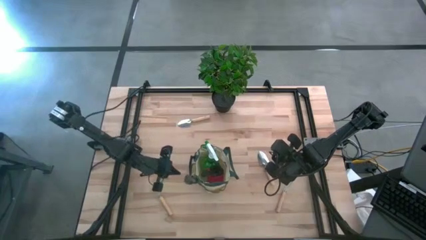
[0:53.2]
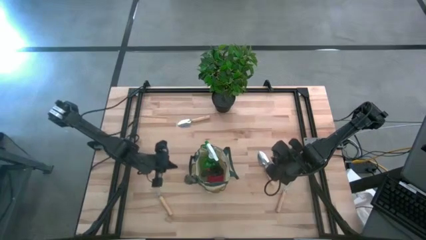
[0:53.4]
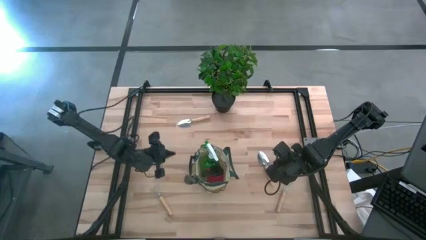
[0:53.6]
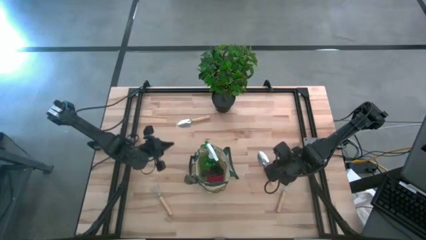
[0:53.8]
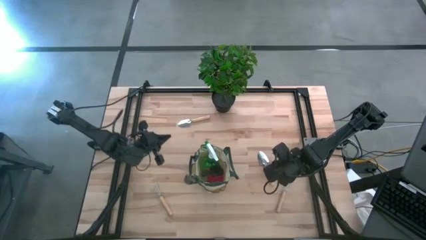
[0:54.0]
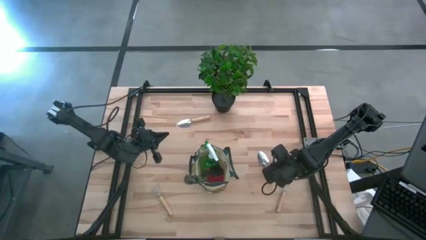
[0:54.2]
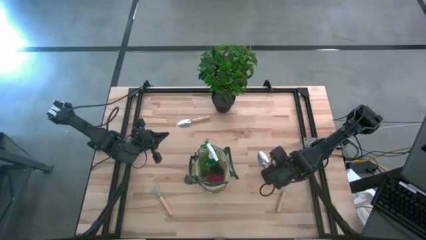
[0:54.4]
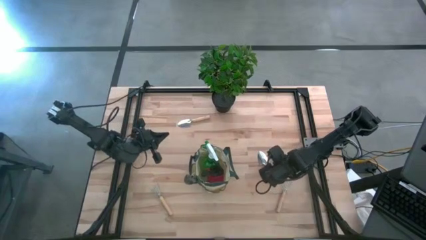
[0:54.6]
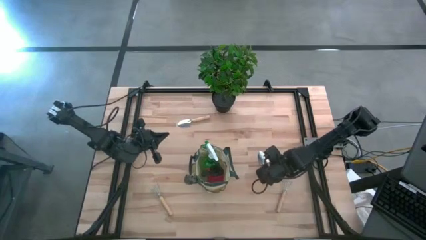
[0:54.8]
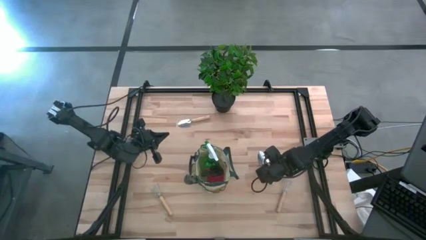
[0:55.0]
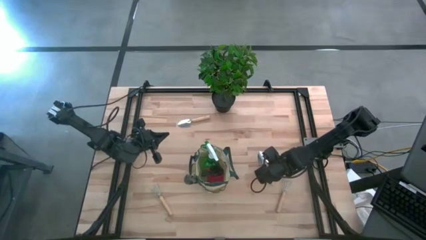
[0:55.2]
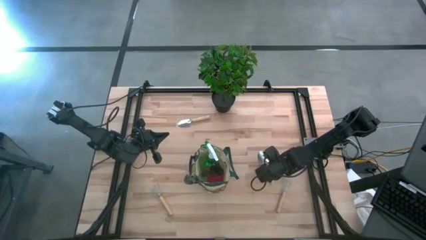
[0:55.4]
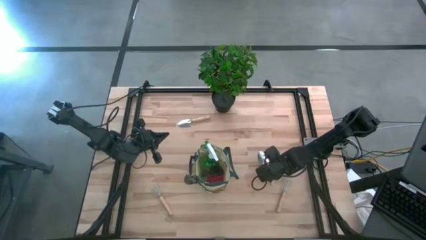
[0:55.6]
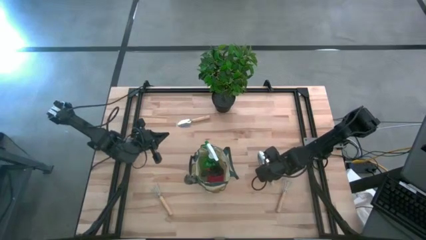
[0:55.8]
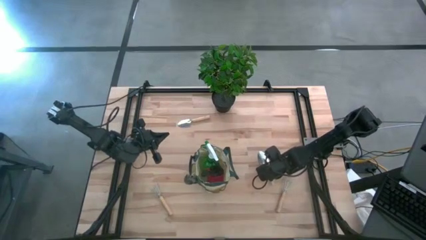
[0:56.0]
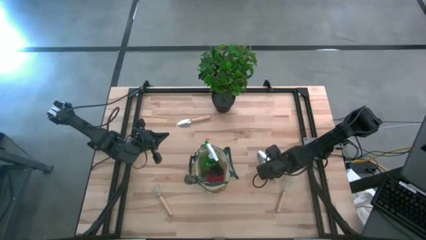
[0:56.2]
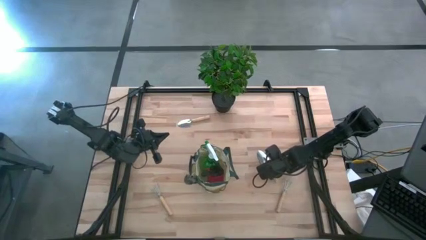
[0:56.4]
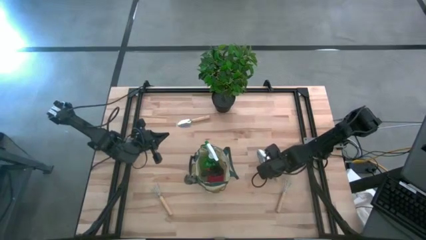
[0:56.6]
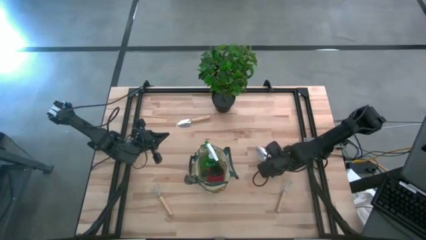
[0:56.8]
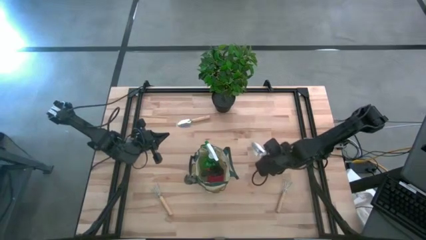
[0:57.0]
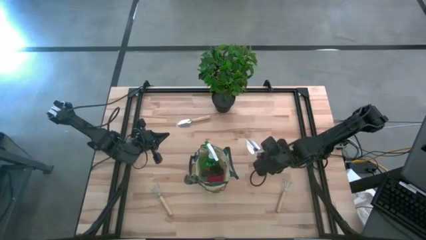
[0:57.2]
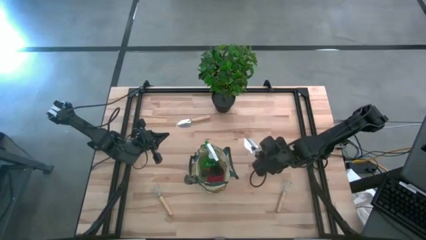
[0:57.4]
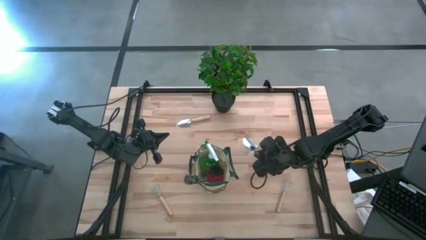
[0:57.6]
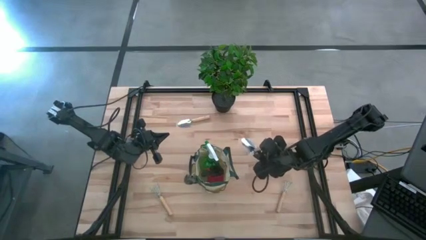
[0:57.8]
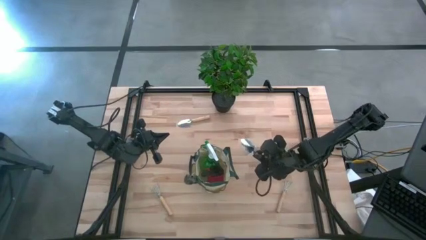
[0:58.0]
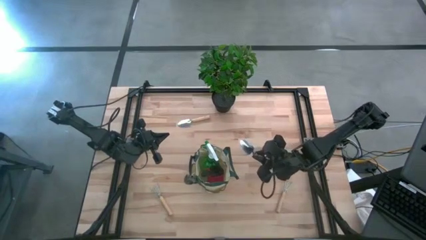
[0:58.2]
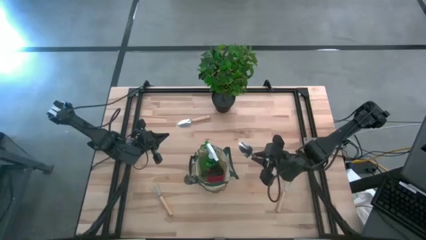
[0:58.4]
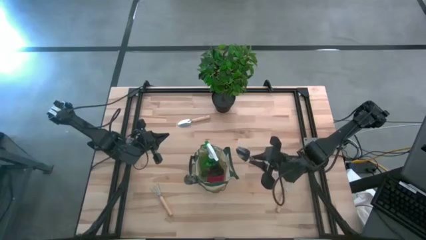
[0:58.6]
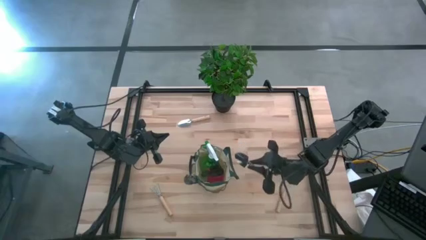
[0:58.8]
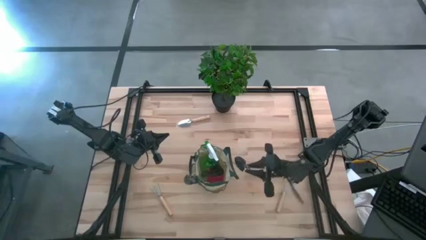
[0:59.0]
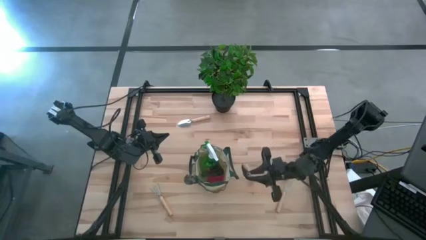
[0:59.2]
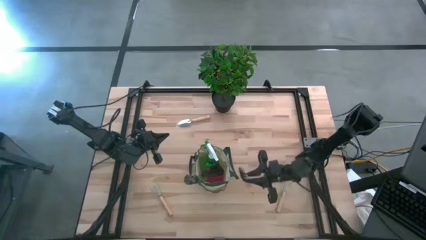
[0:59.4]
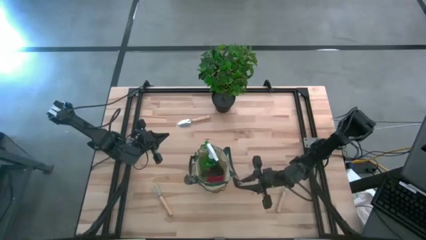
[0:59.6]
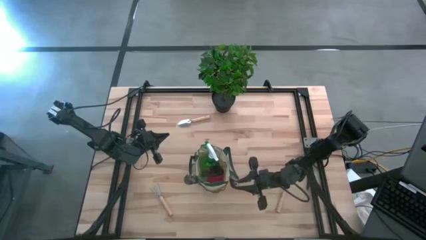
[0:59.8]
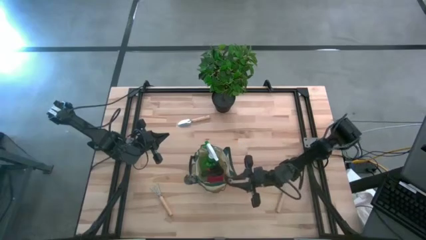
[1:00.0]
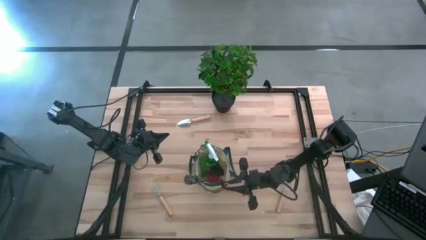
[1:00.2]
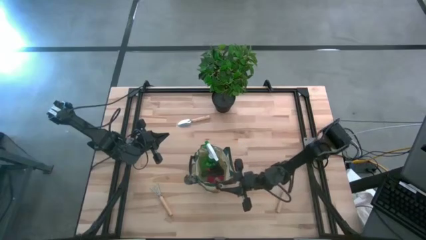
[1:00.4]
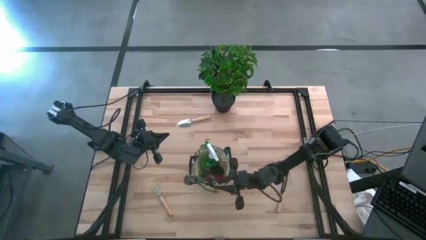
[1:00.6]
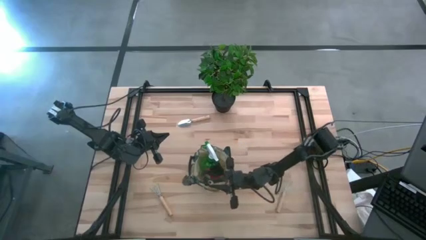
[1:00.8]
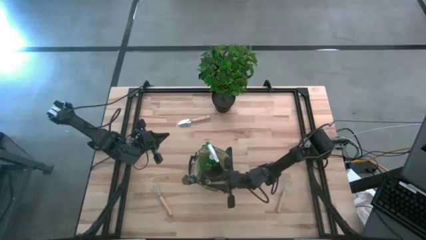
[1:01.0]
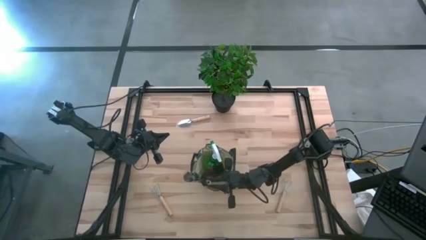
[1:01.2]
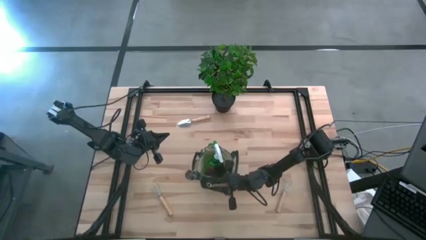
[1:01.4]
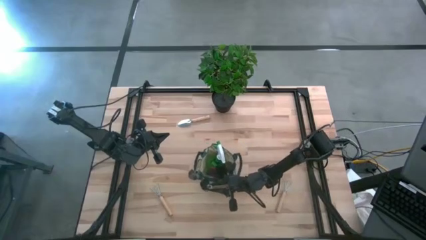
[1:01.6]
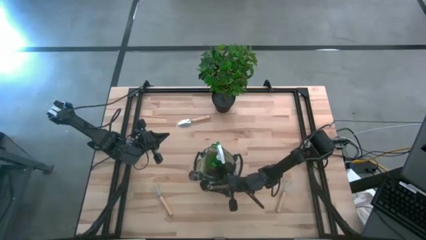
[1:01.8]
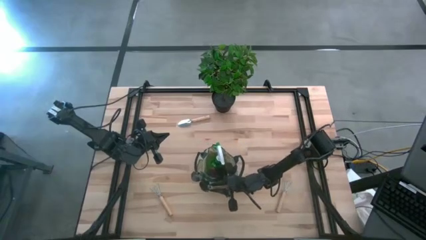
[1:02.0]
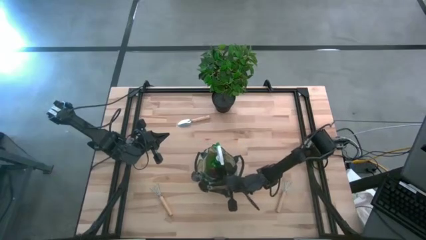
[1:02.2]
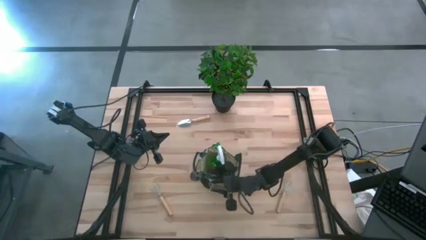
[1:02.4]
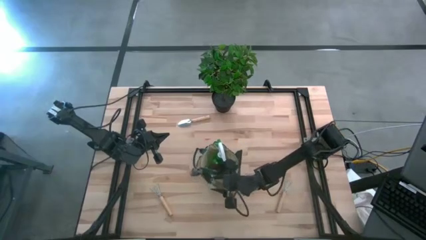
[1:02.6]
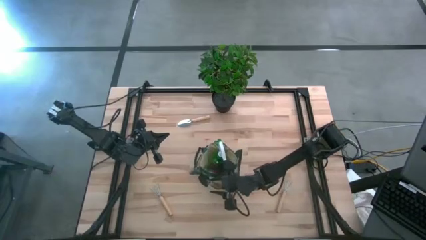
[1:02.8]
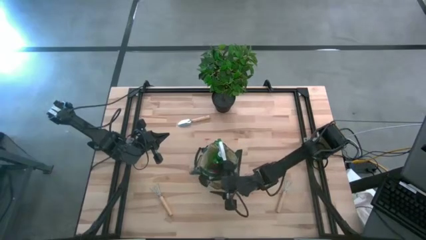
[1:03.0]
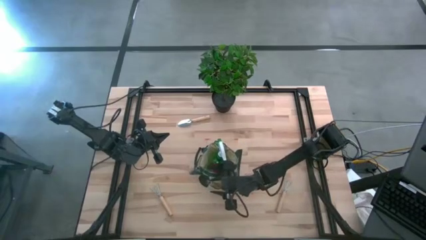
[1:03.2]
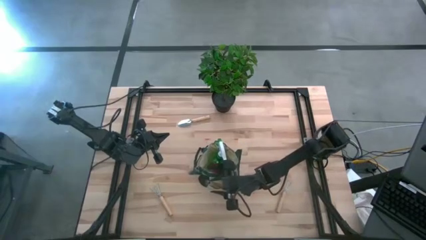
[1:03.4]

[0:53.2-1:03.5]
Task: Pick & Place Garden tools in Gardening bag
Put the right brown trowel into the green gardening bag
